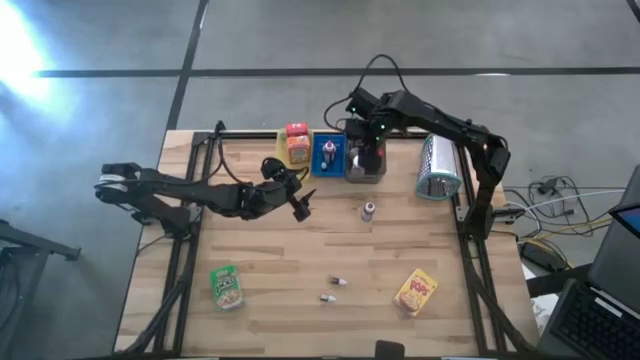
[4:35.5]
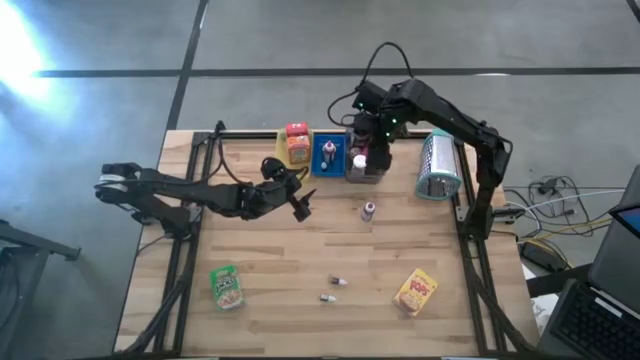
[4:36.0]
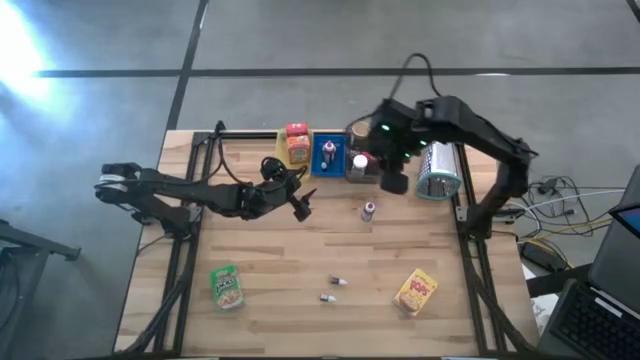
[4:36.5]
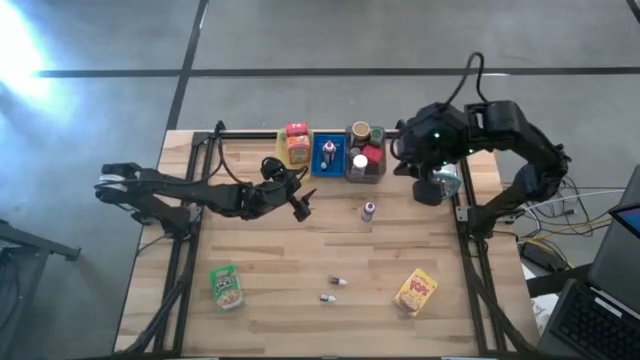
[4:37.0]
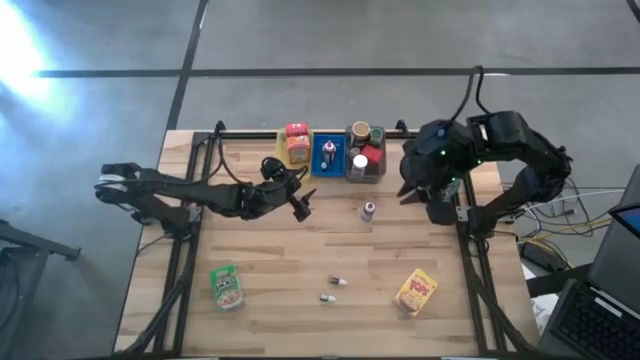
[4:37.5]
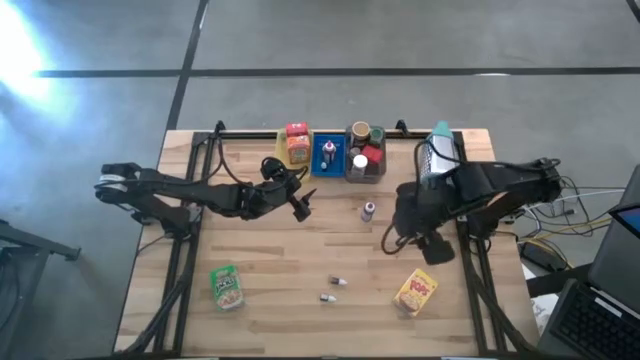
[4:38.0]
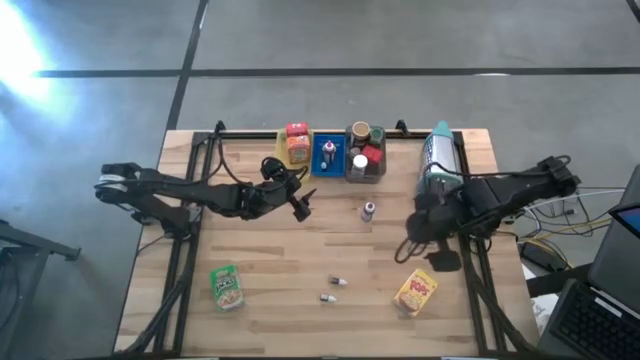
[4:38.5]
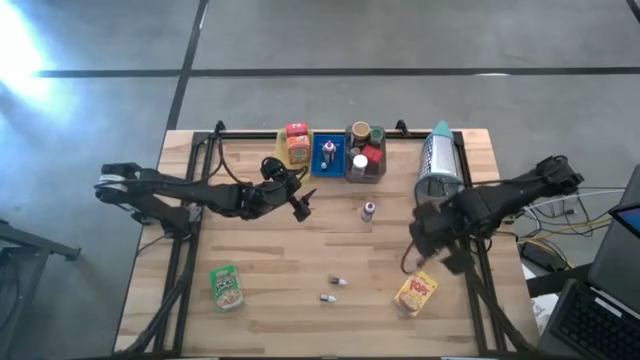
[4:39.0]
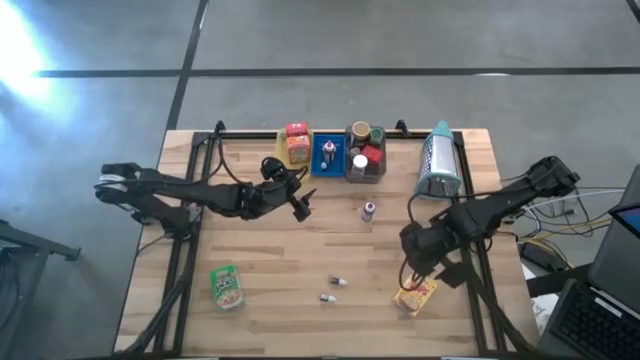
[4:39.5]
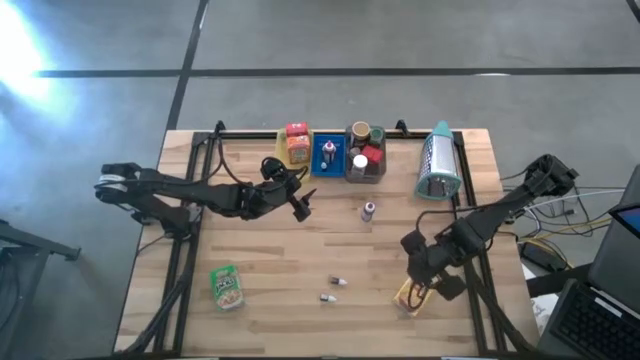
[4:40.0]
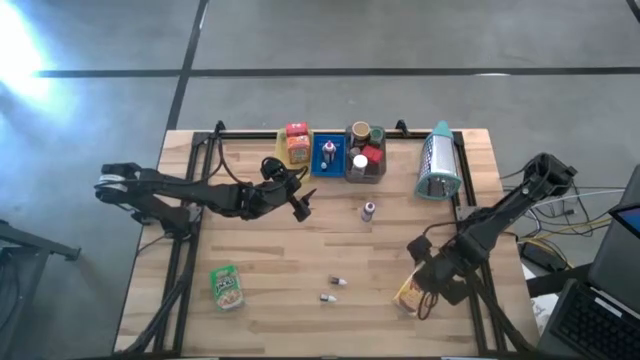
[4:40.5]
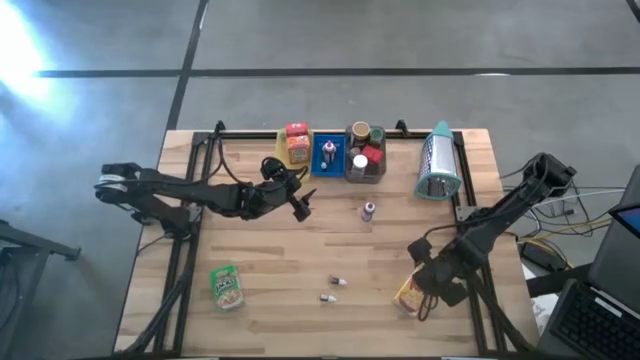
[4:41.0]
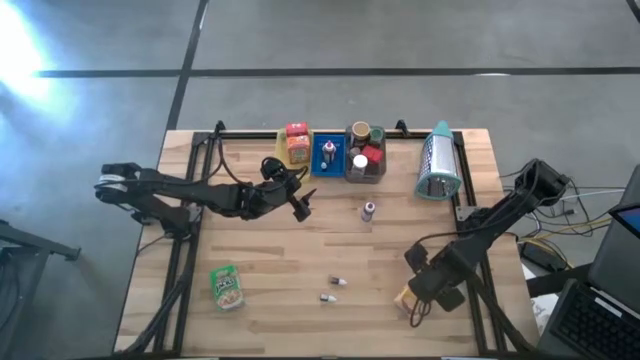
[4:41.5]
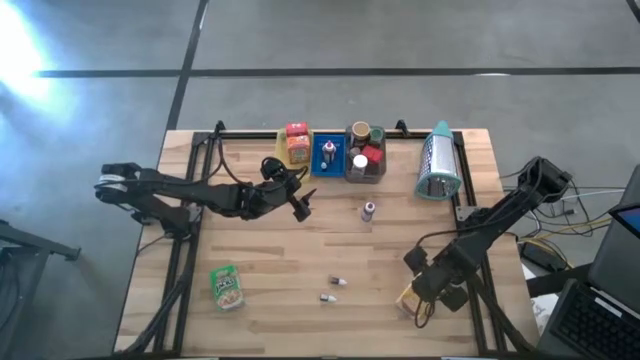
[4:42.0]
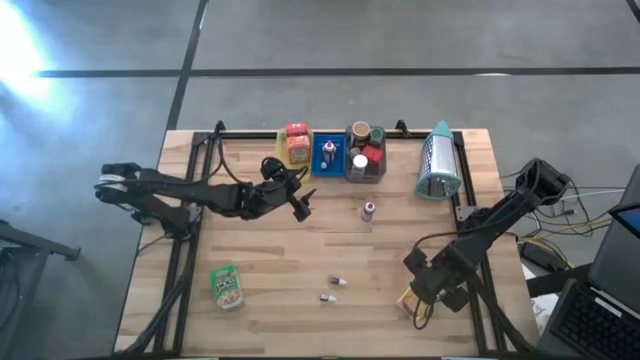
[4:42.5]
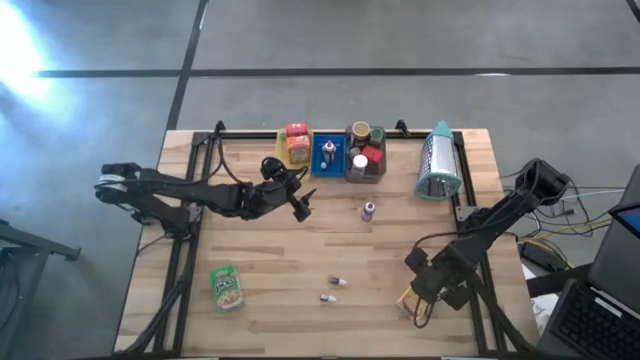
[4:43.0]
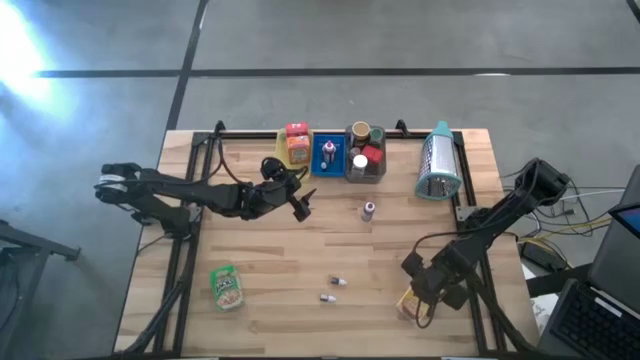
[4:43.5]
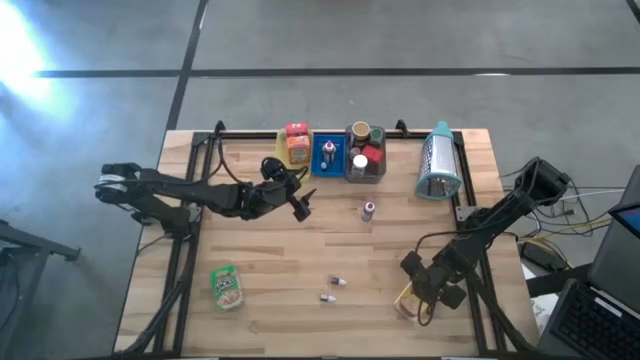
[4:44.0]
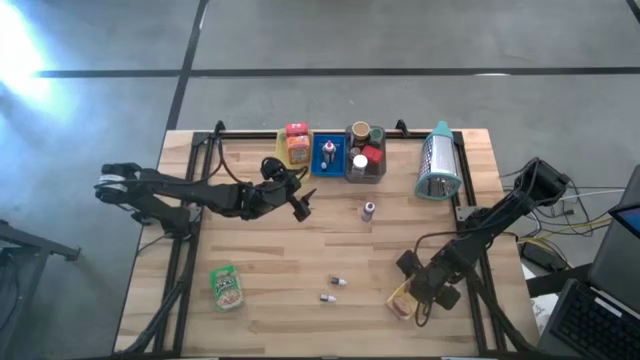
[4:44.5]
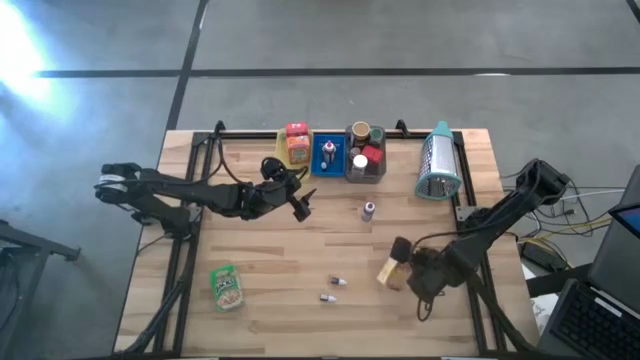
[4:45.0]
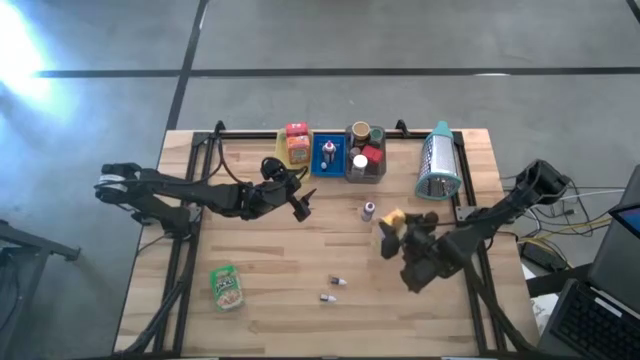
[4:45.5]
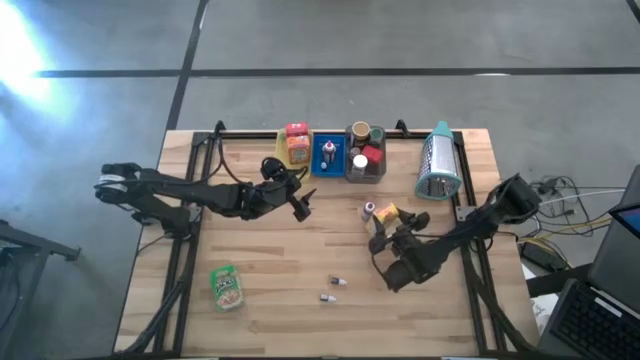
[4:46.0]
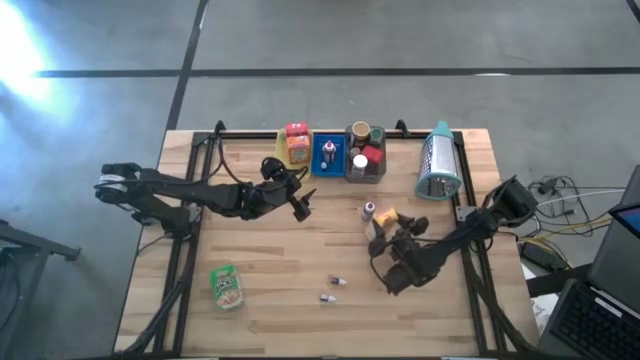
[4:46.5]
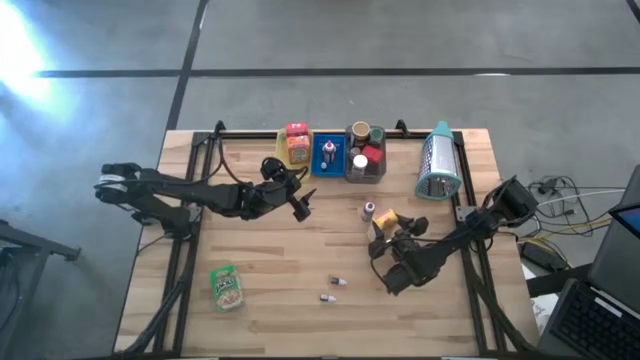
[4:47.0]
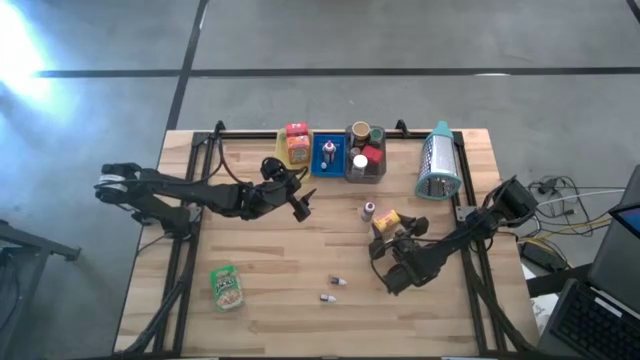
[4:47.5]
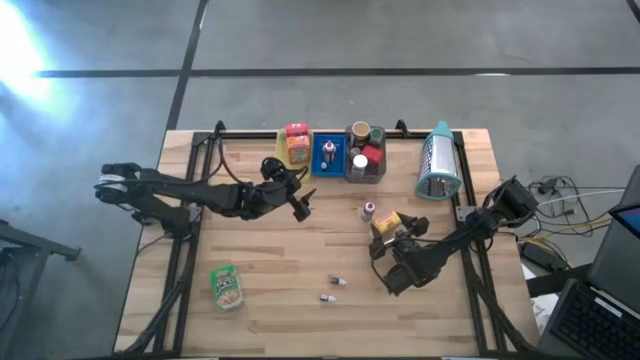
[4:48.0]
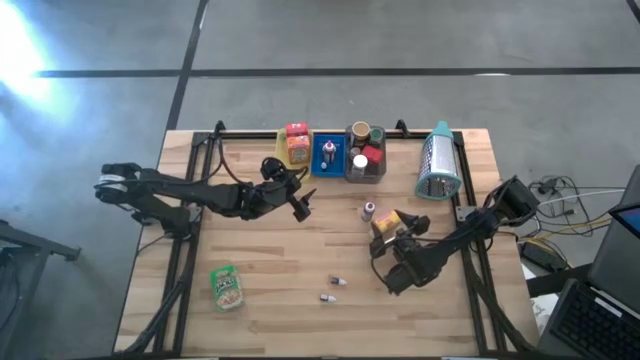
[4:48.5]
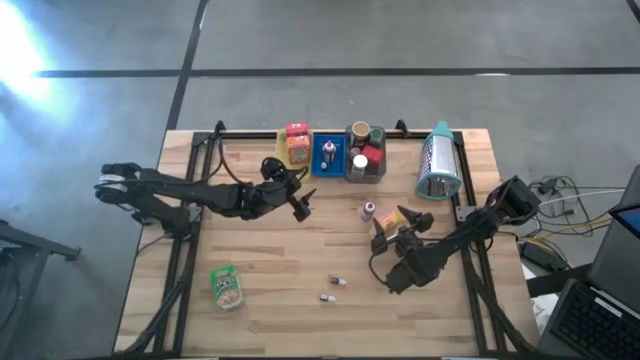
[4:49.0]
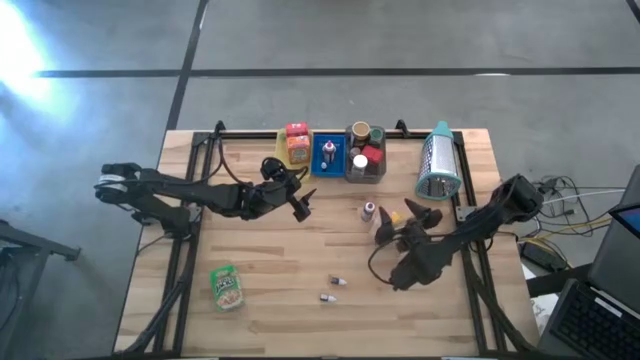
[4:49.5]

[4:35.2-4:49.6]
Task: Pick & Place Kitchen Items
Put the yellow cereal box into the yellow bin

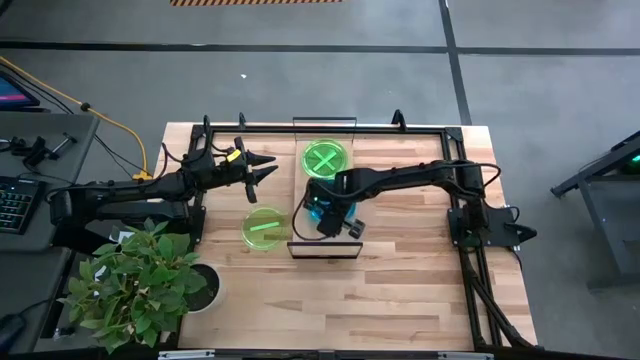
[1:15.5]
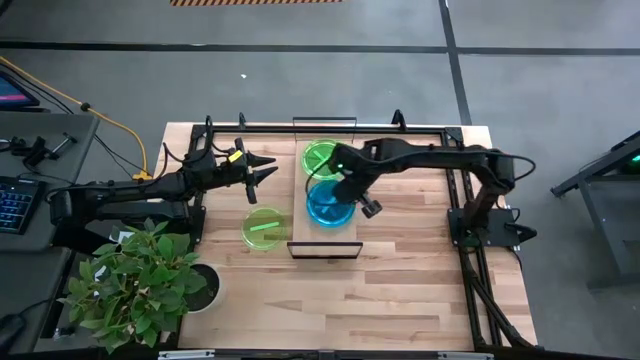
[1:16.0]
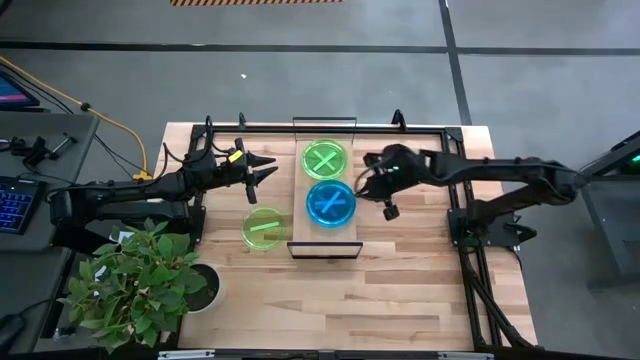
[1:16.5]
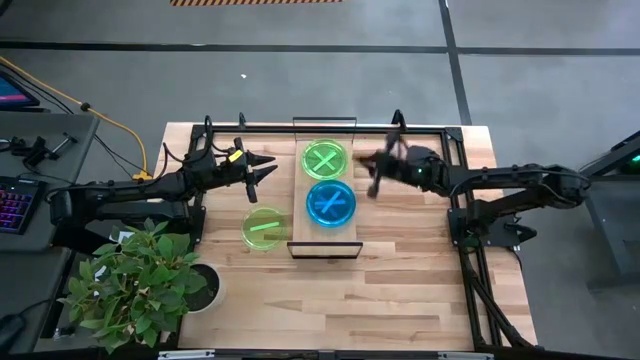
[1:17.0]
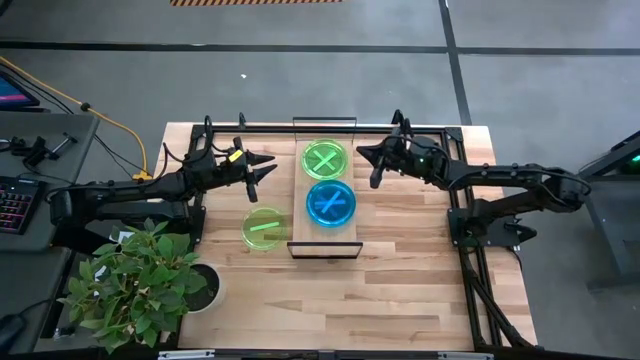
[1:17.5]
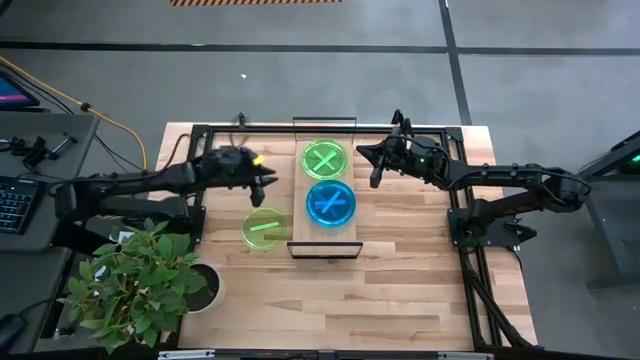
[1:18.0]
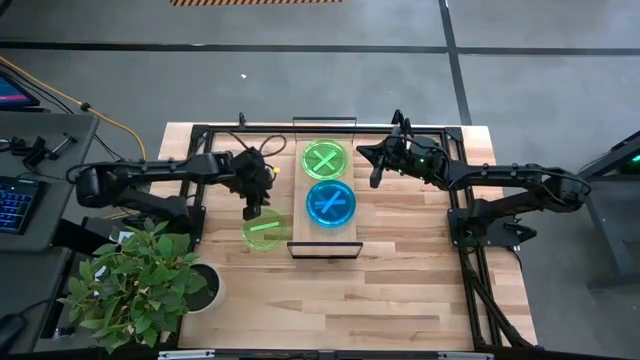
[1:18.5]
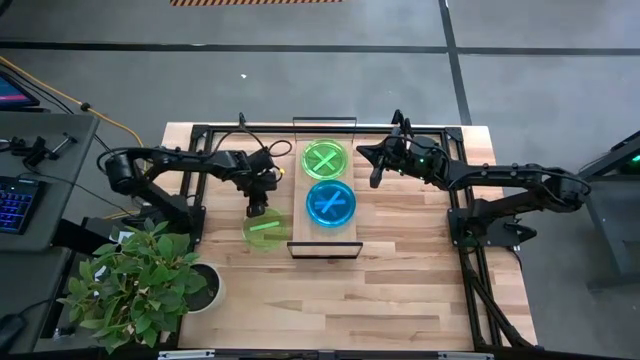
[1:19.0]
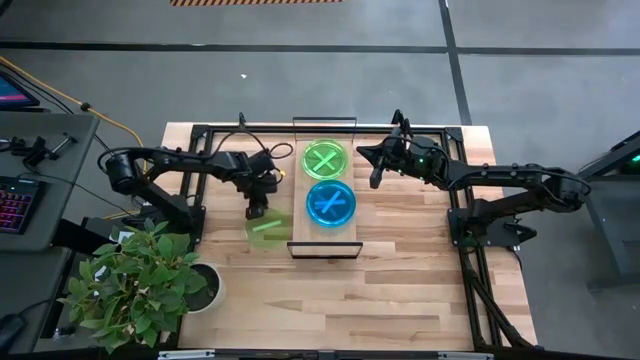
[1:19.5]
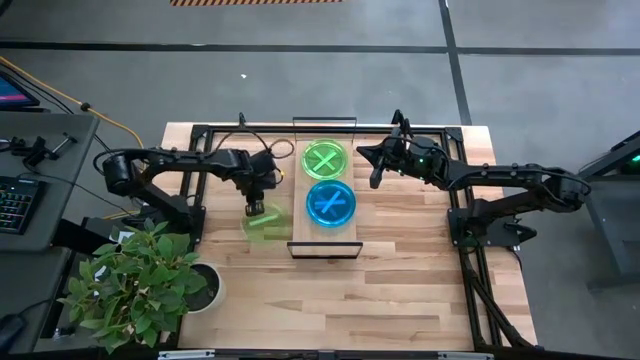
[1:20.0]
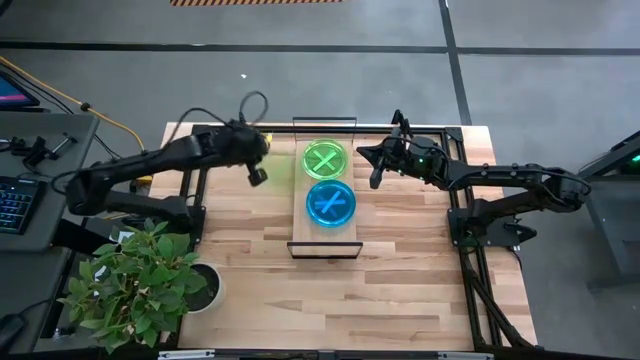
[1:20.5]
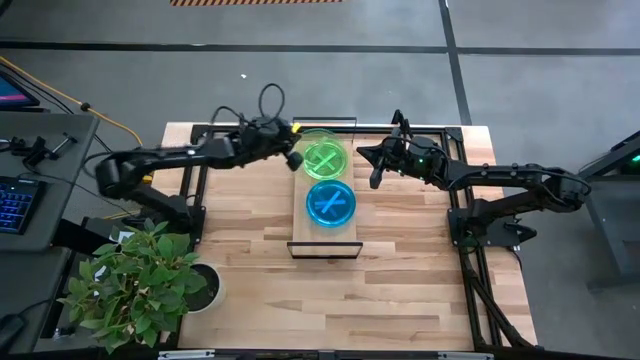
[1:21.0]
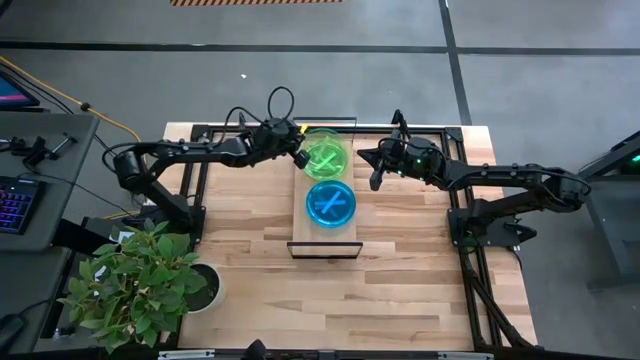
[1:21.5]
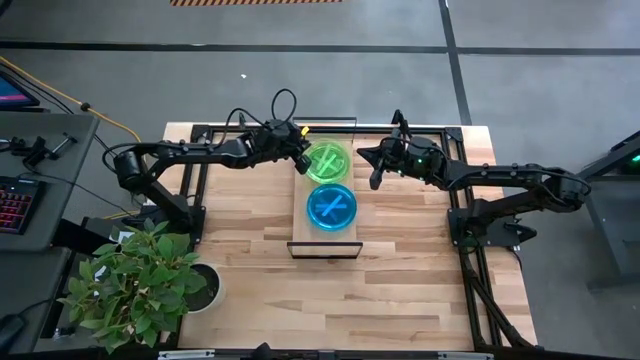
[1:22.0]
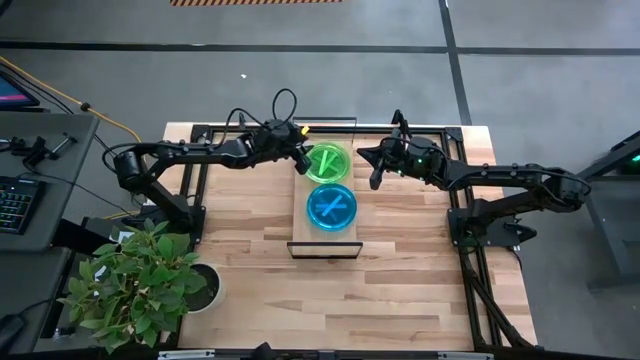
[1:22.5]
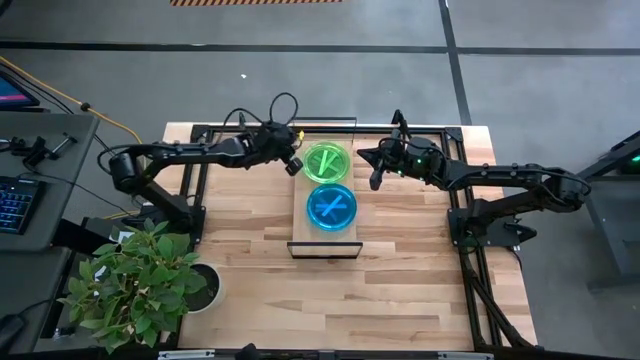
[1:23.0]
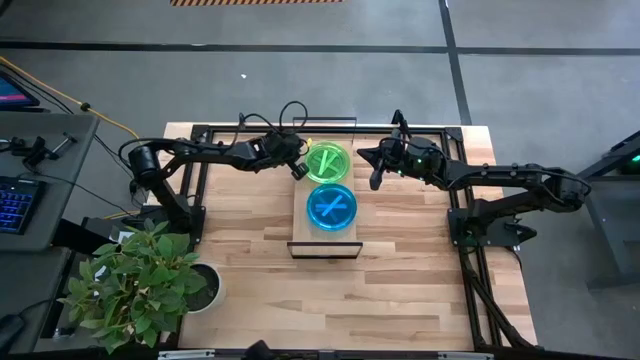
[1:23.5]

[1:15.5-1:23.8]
Task: Place and stack plates onto a shelf
Stack the green plate on top of the green plates on the shelf
